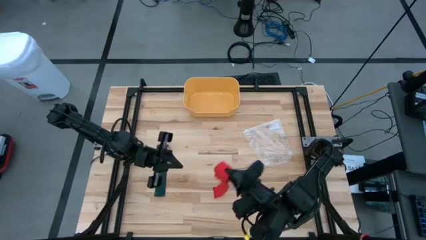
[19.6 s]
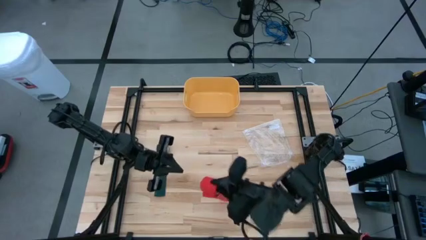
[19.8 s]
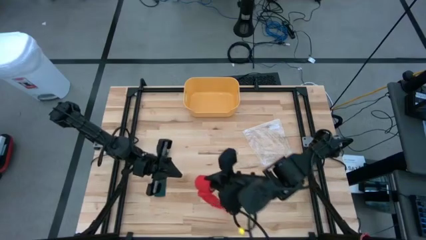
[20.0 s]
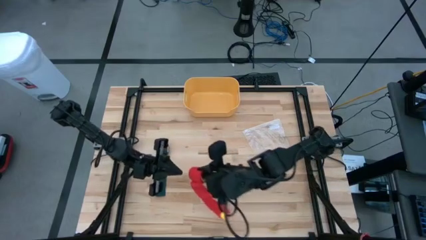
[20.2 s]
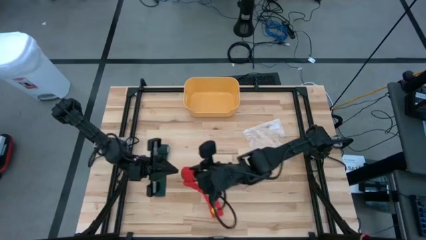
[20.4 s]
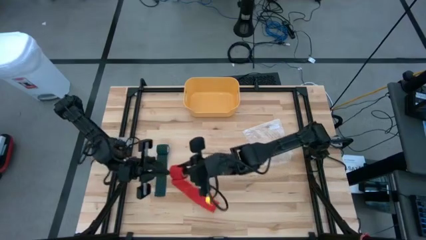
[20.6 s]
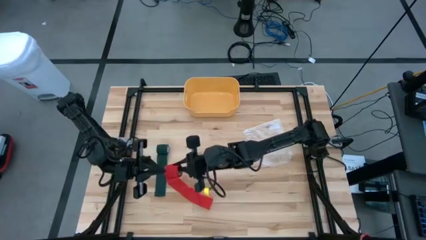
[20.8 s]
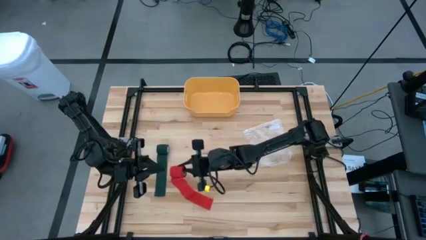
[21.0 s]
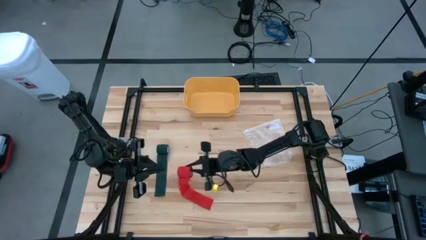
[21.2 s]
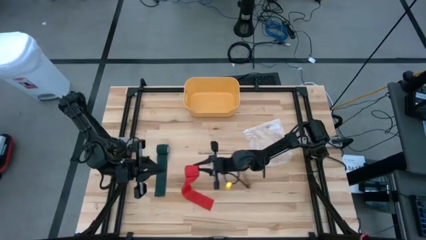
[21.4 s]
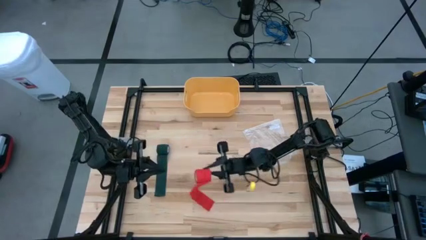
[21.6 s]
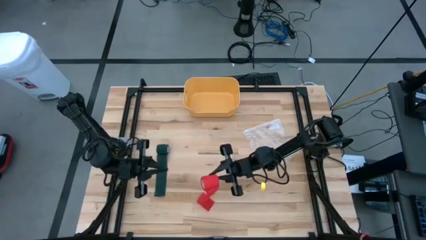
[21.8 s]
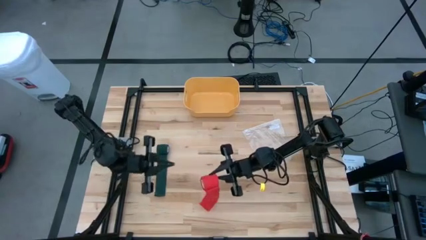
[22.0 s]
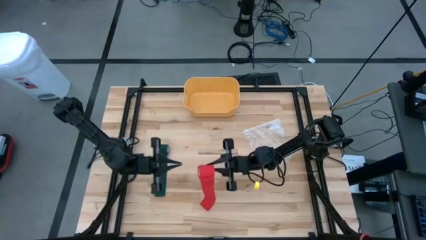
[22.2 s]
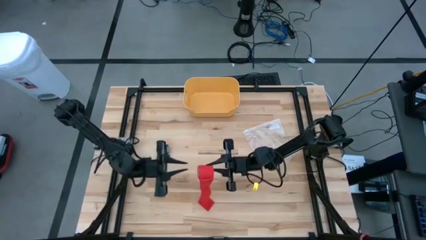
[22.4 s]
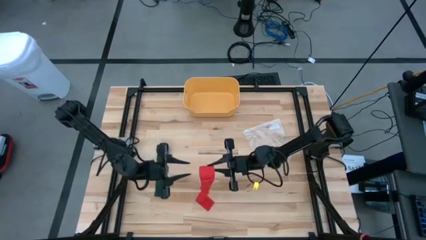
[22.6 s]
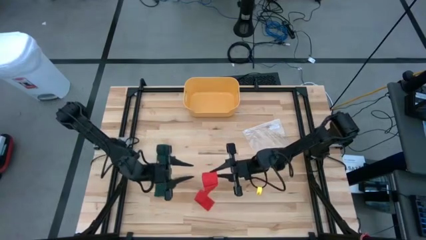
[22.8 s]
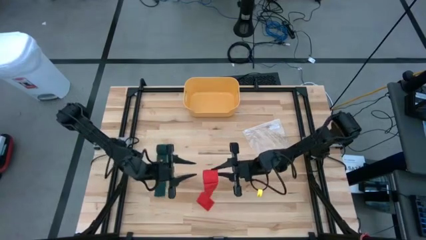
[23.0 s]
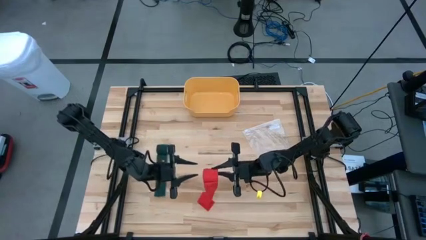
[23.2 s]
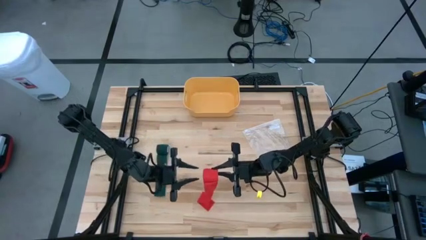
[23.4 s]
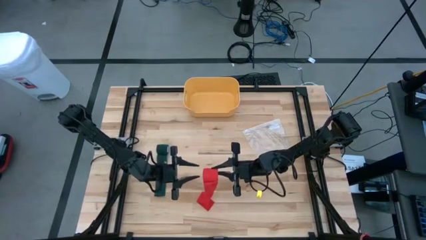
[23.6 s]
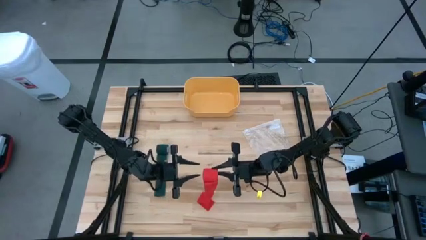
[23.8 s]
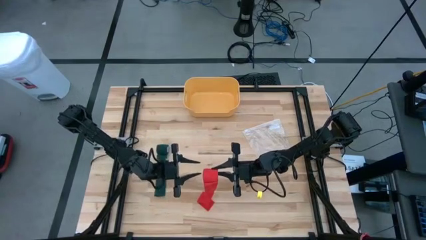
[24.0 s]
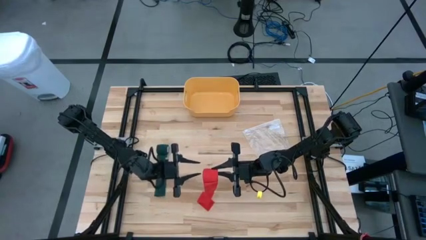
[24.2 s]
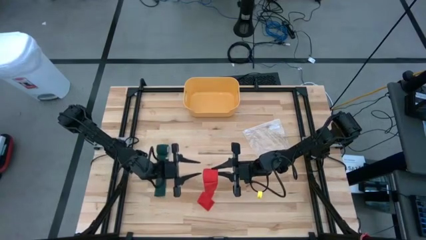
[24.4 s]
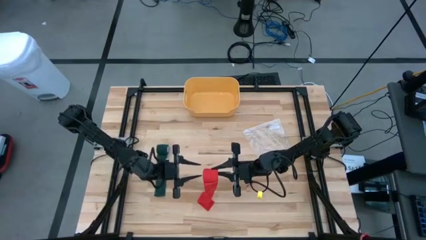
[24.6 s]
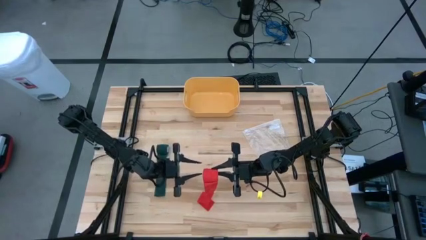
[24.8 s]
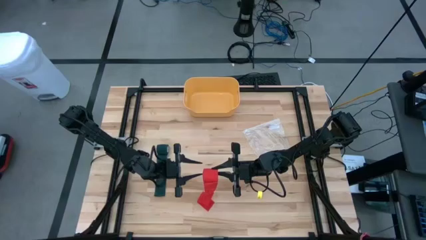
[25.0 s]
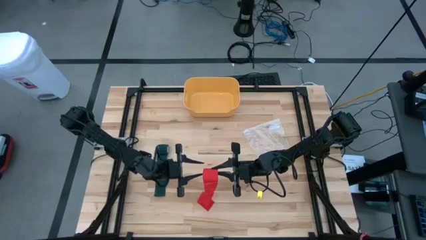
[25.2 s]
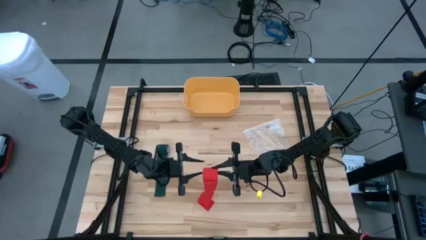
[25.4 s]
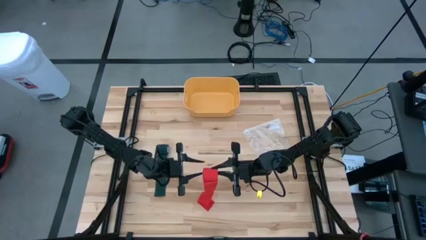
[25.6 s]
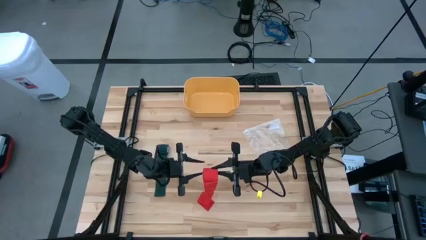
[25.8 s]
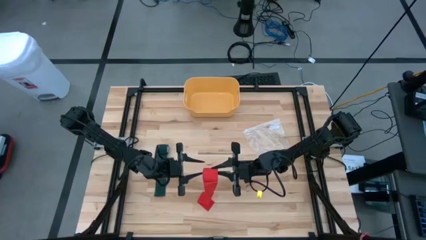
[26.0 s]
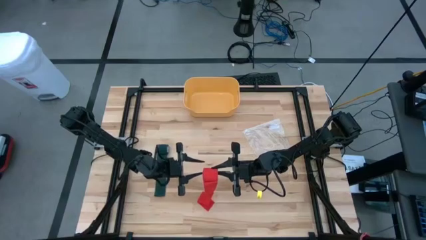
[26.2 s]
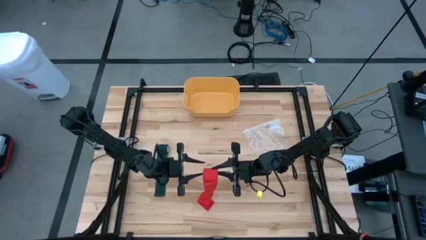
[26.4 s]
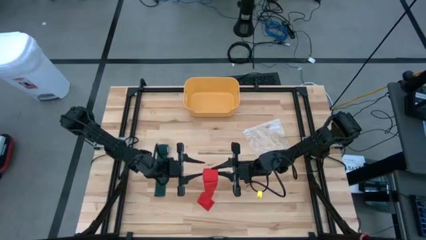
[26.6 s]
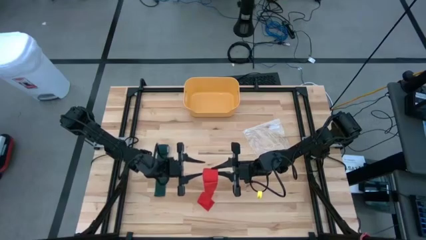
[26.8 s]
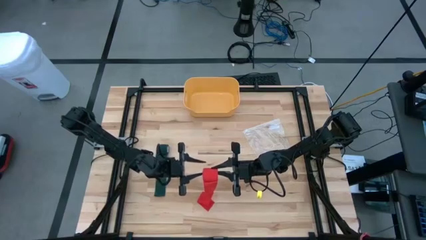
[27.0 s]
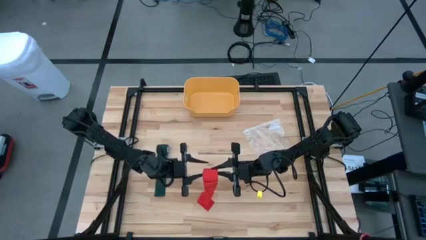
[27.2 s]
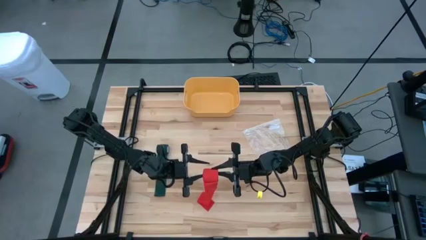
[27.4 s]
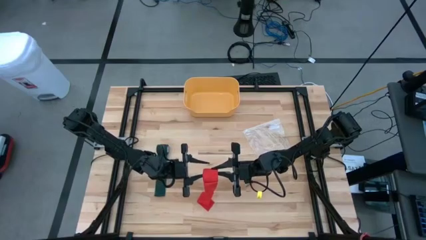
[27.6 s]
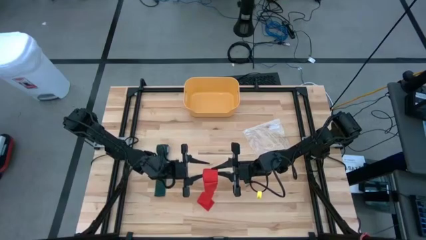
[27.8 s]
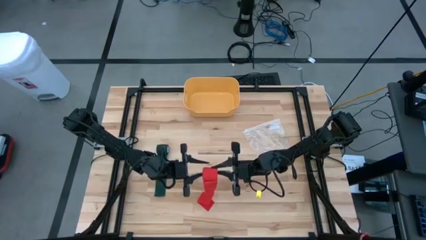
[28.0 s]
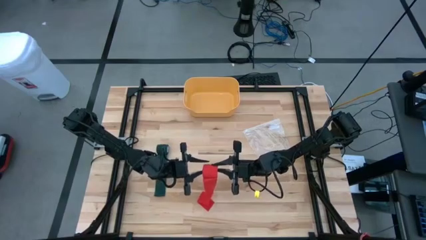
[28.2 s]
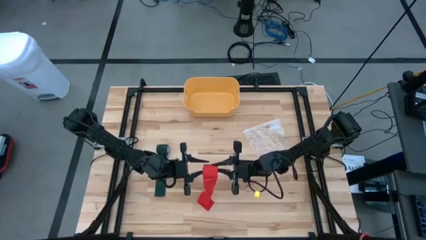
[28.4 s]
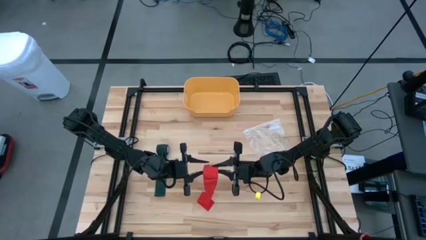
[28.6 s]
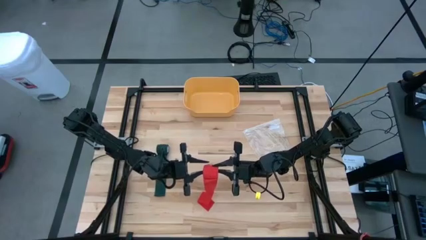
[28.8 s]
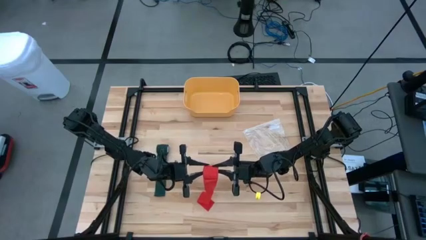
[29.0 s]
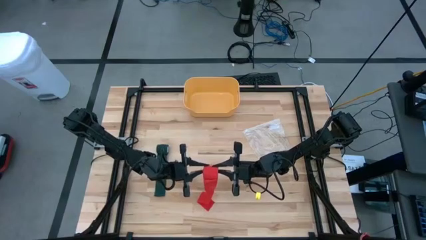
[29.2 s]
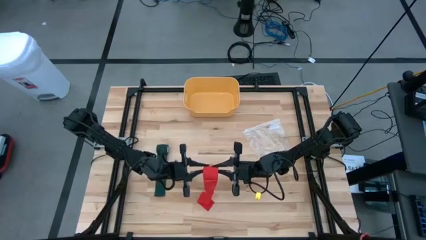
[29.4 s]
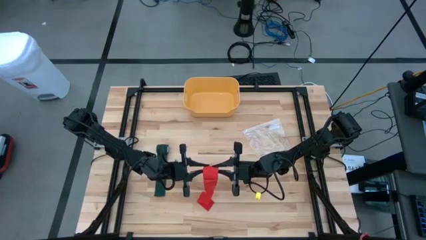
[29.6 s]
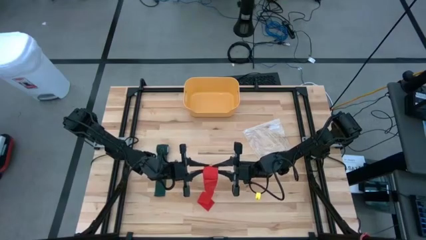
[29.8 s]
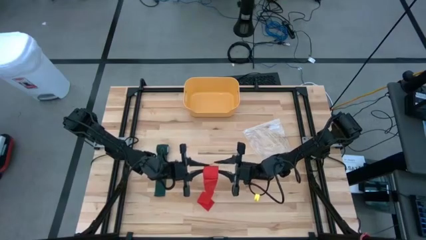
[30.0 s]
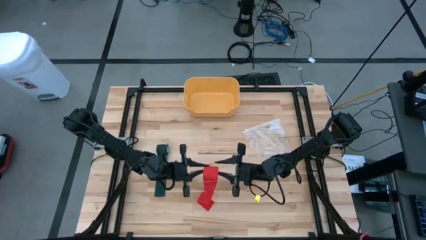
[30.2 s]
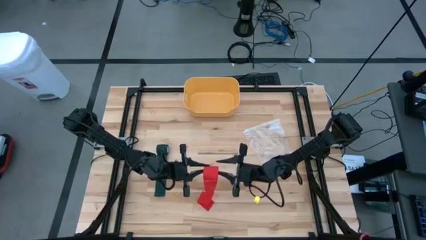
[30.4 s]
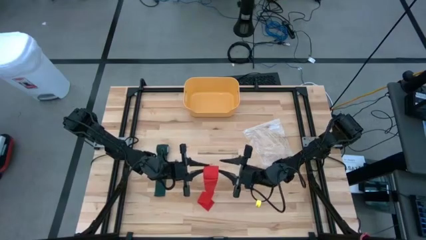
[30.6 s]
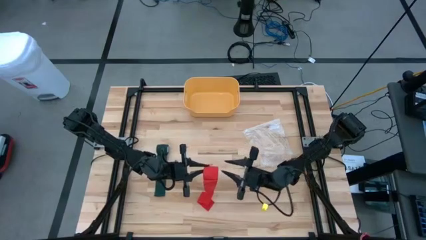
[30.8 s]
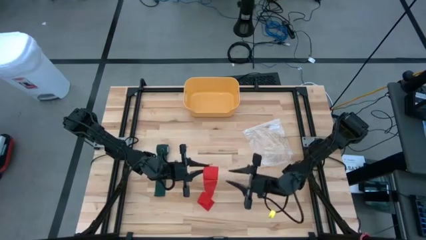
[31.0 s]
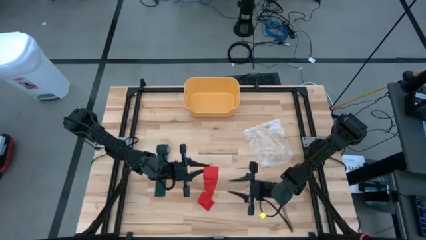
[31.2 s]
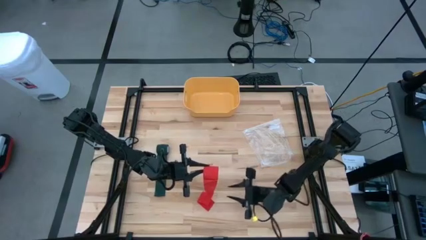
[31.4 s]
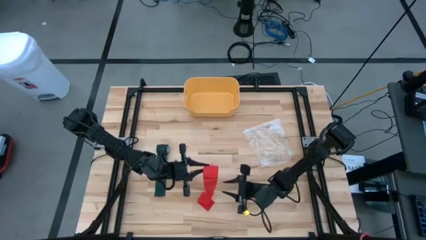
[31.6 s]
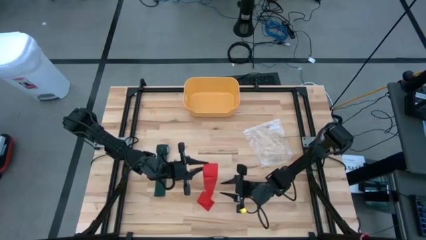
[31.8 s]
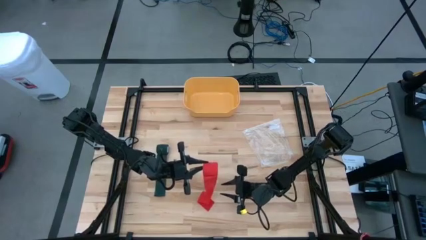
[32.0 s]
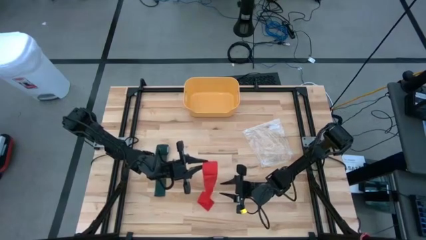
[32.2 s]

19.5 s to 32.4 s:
Task: Roll bandage
Roll the red bandage
